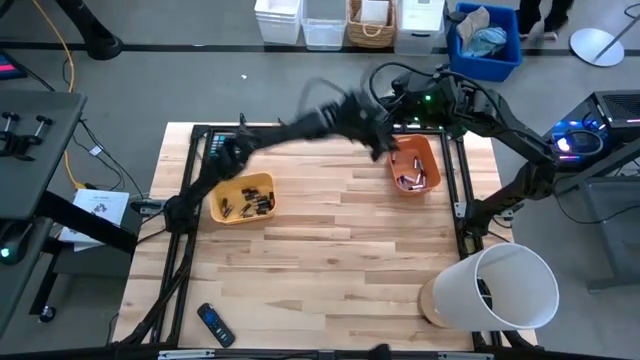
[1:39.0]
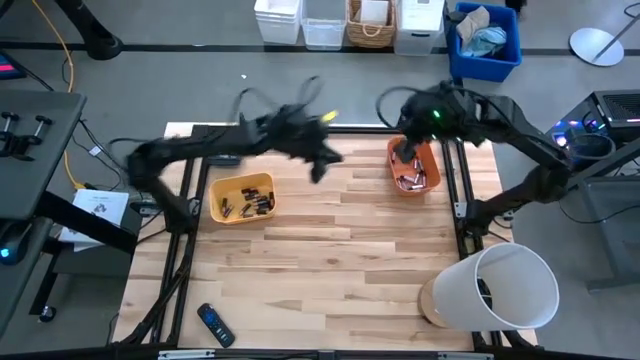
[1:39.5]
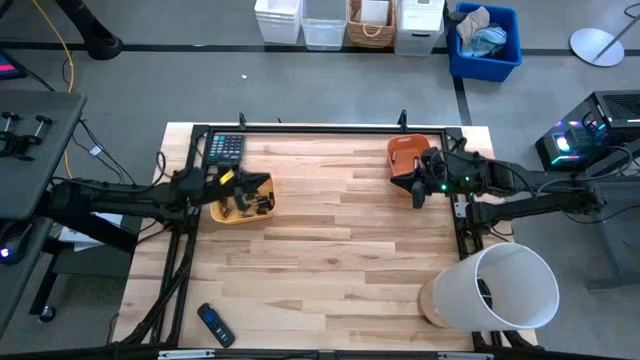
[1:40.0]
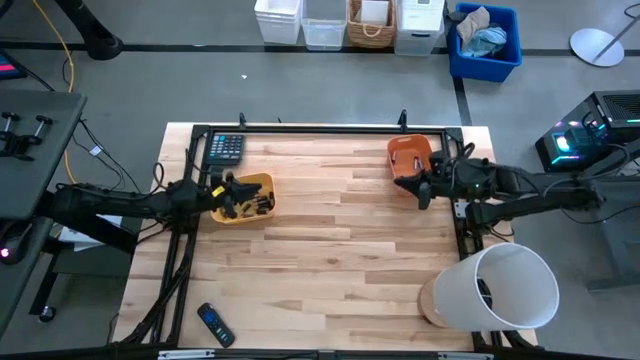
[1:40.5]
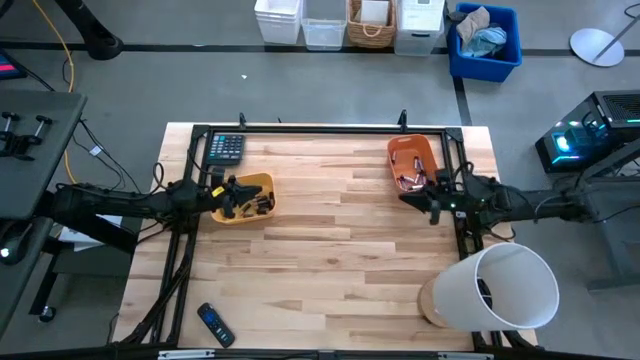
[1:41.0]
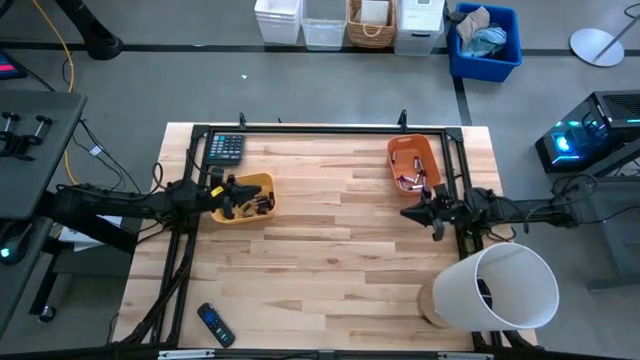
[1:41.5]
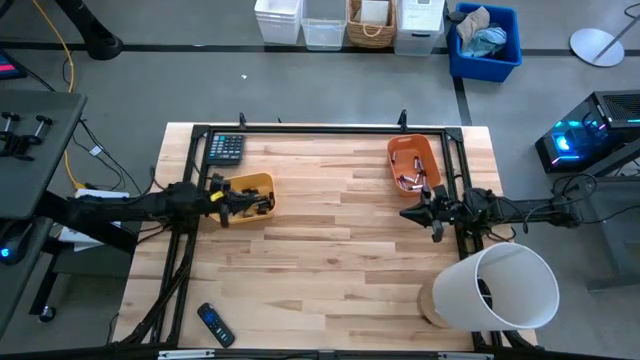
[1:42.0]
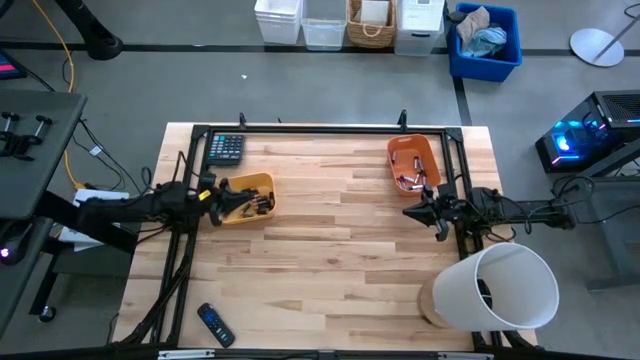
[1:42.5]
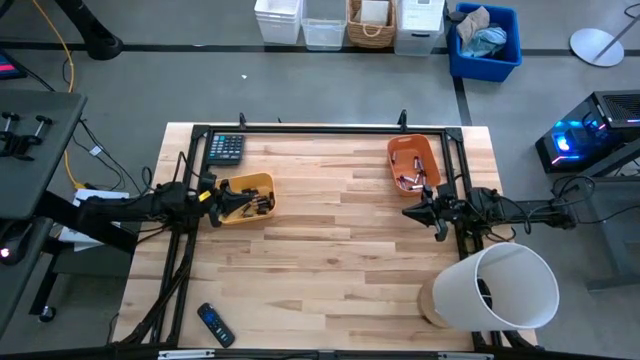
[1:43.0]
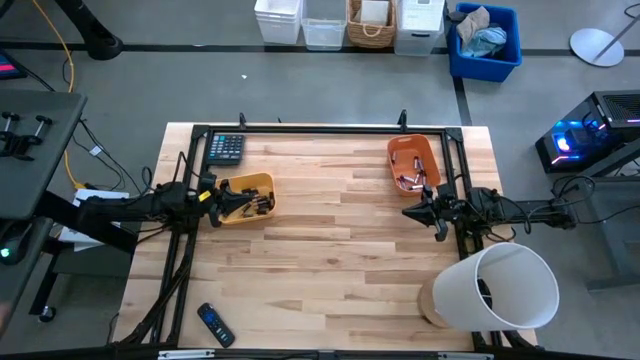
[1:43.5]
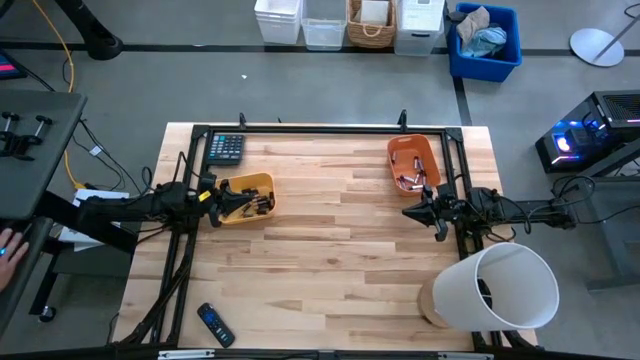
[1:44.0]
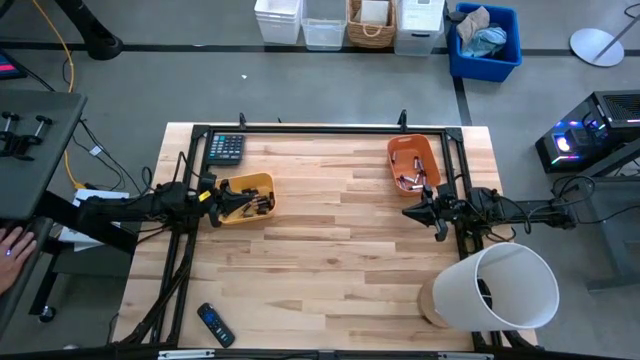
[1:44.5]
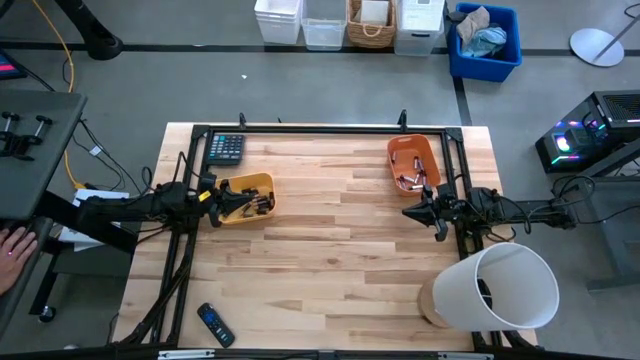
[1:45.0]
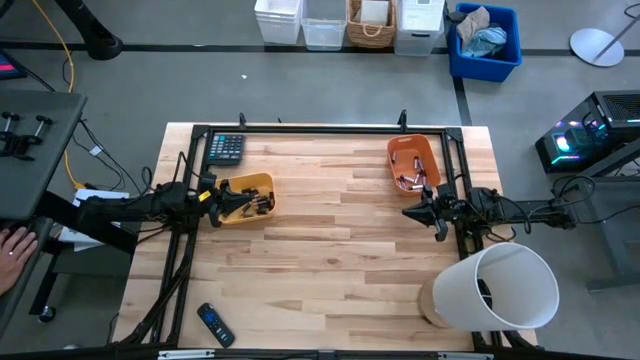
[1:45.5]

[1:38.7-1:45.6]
Task: Sort batteries
Return to Home Position

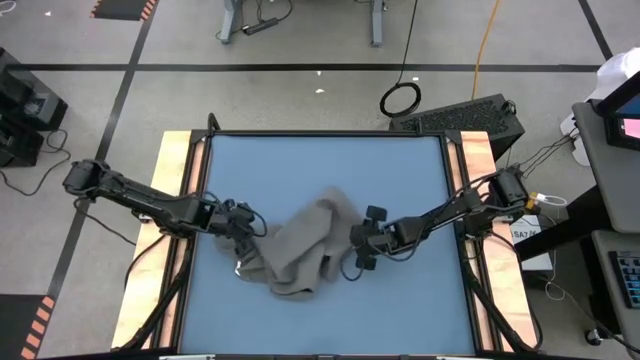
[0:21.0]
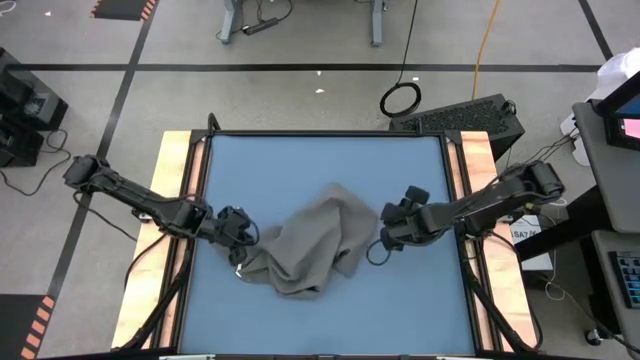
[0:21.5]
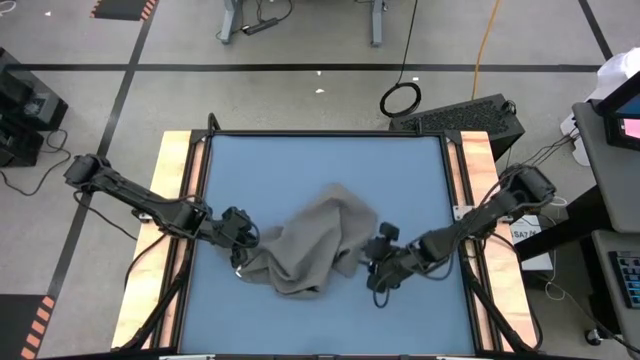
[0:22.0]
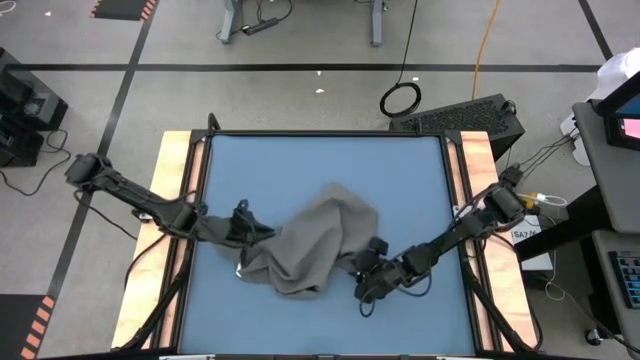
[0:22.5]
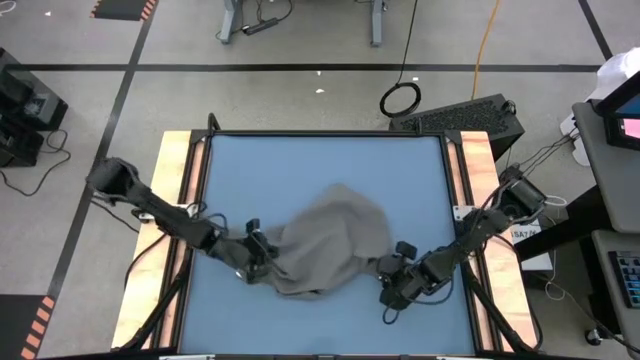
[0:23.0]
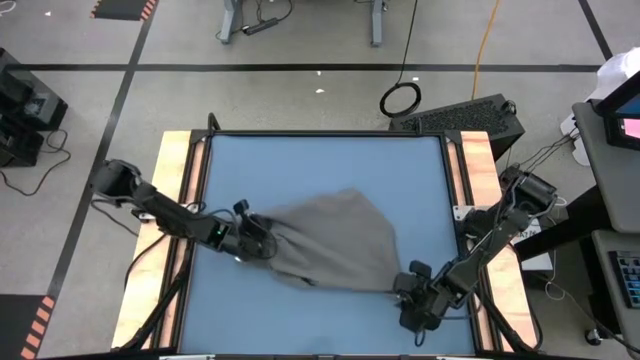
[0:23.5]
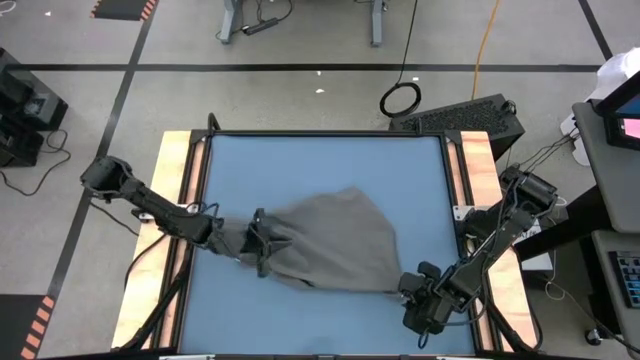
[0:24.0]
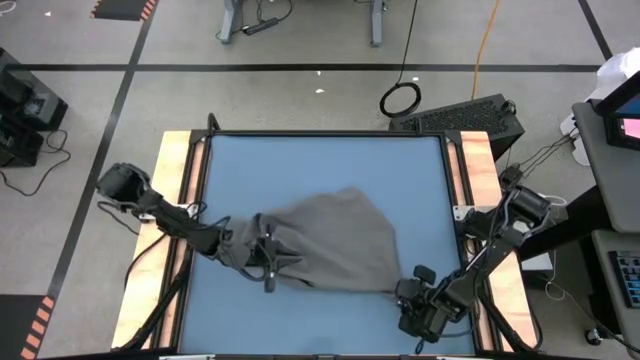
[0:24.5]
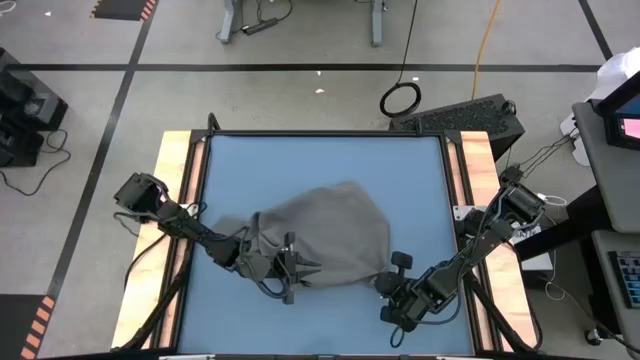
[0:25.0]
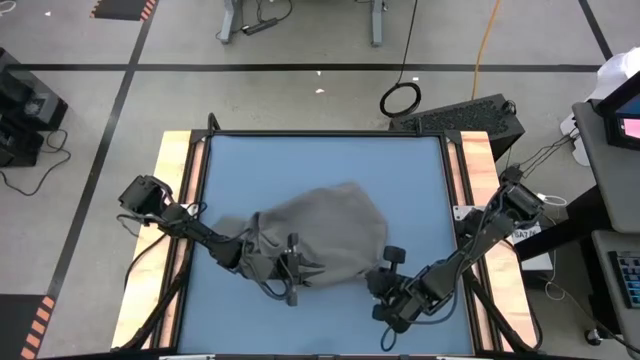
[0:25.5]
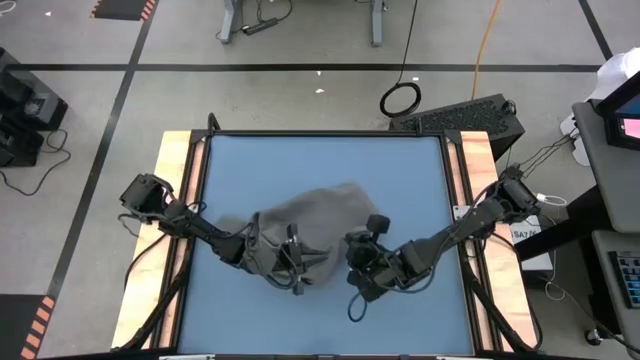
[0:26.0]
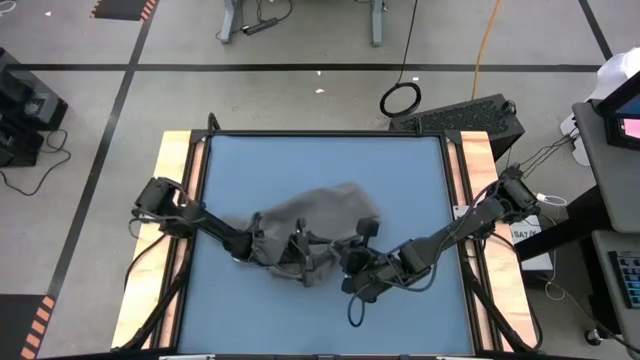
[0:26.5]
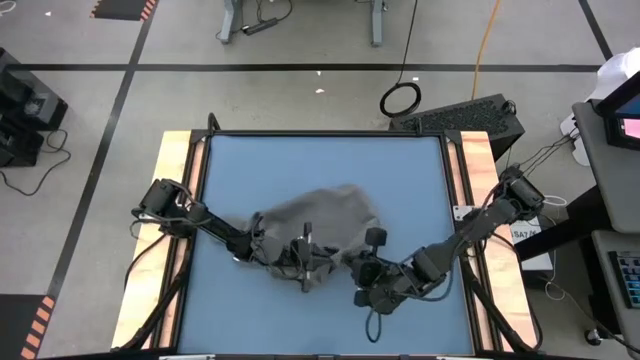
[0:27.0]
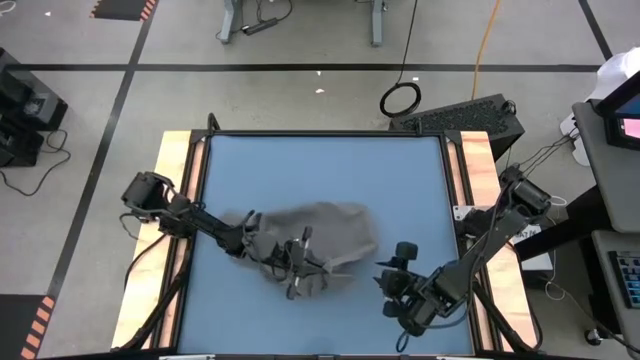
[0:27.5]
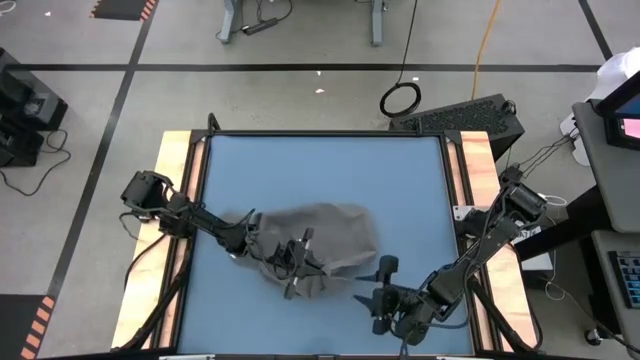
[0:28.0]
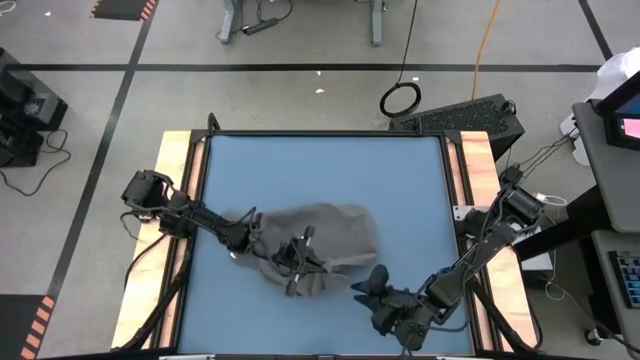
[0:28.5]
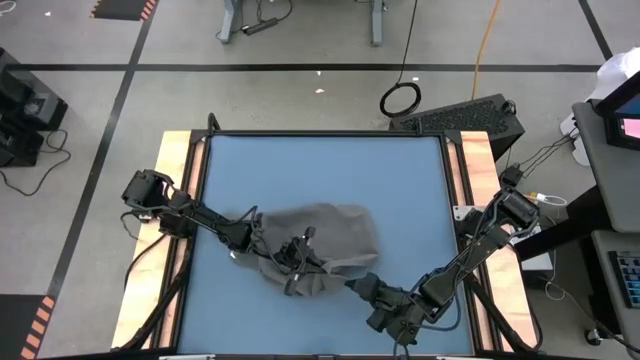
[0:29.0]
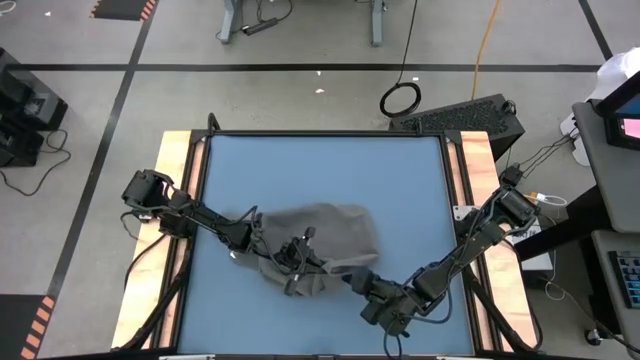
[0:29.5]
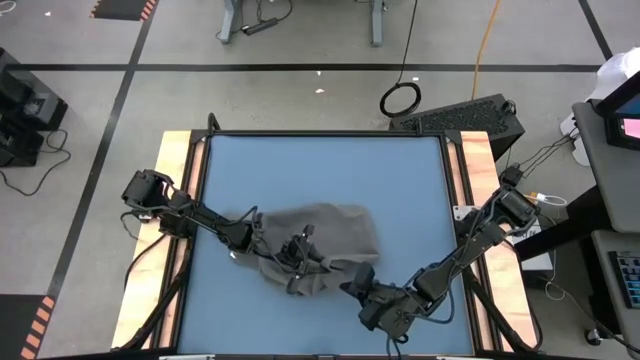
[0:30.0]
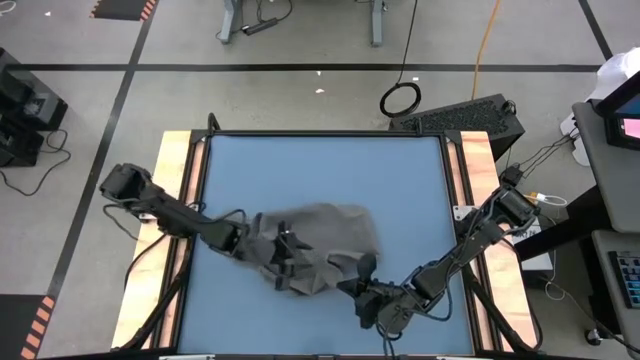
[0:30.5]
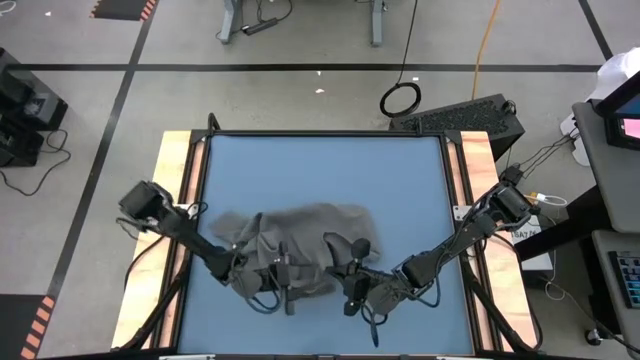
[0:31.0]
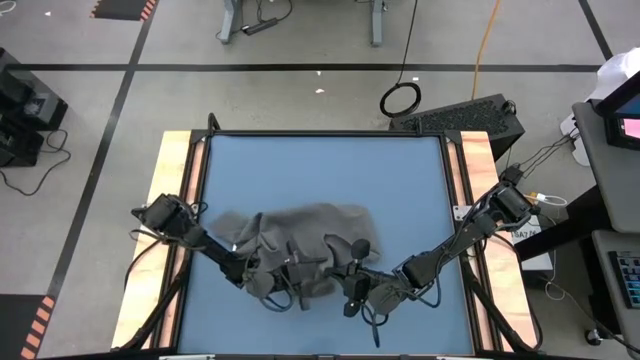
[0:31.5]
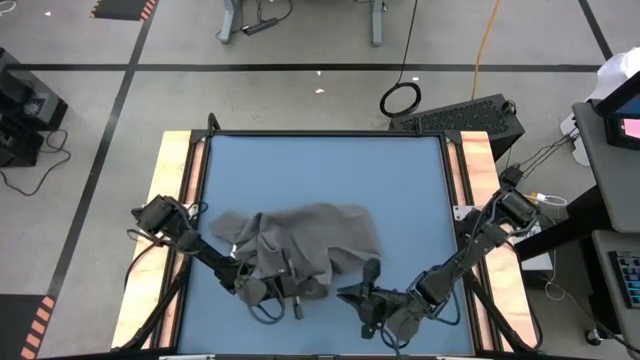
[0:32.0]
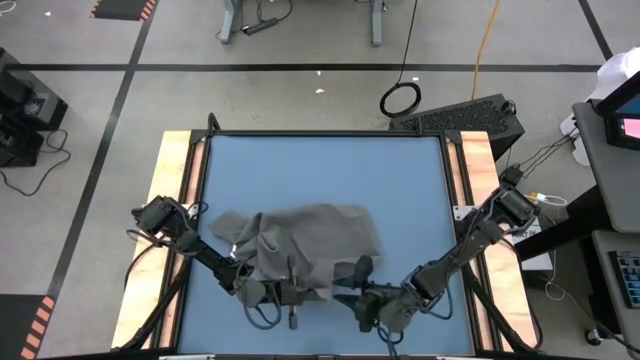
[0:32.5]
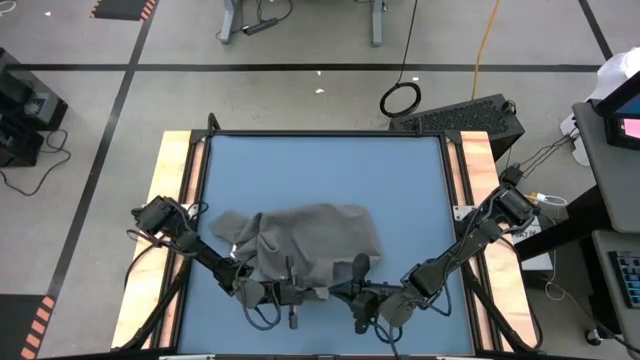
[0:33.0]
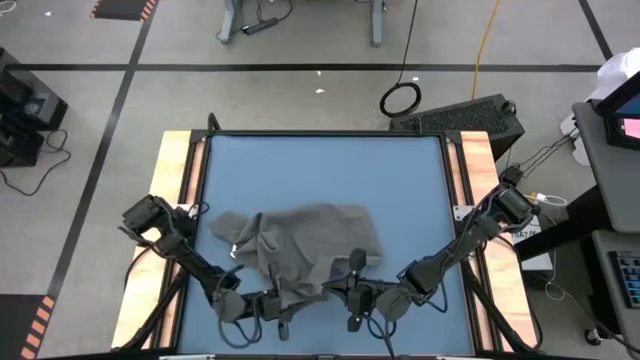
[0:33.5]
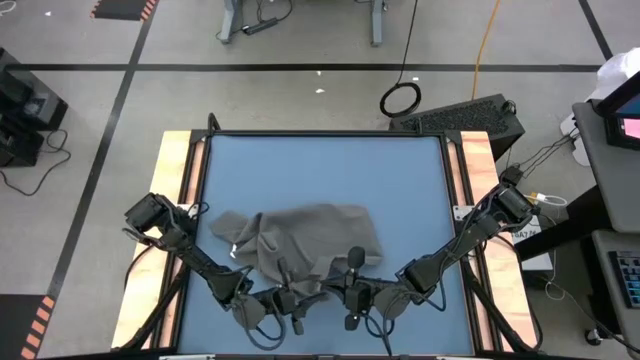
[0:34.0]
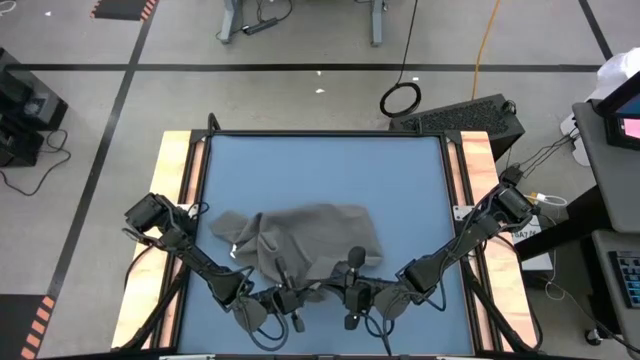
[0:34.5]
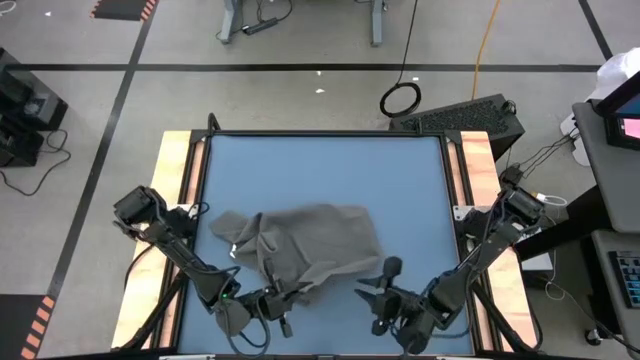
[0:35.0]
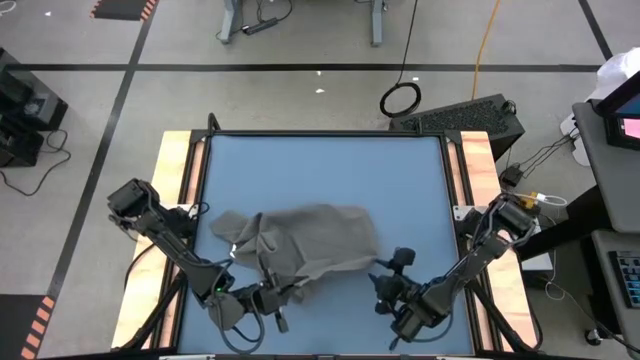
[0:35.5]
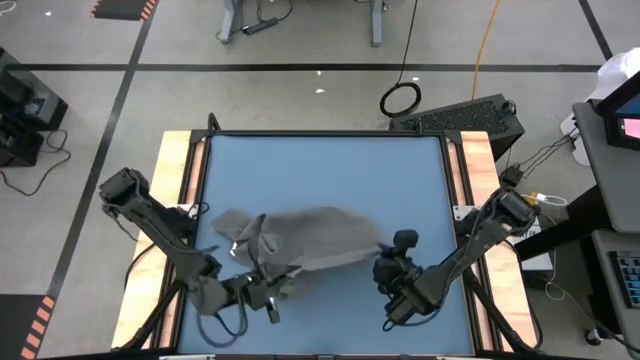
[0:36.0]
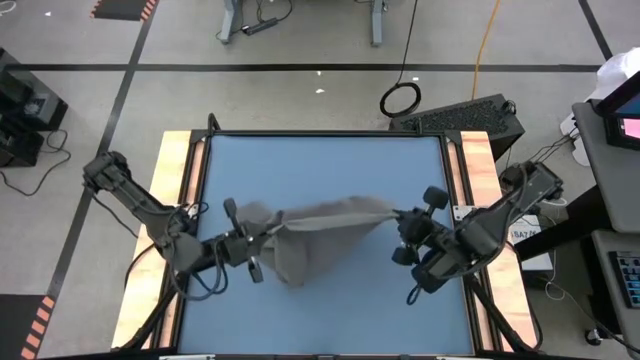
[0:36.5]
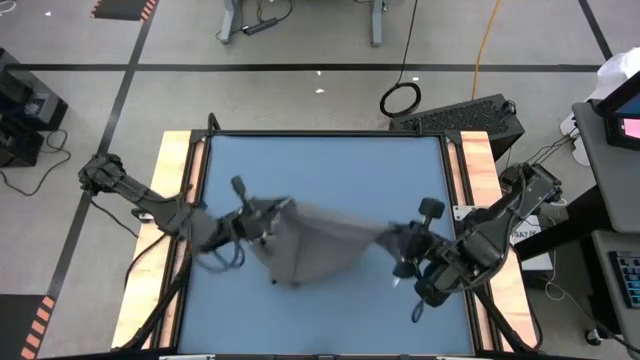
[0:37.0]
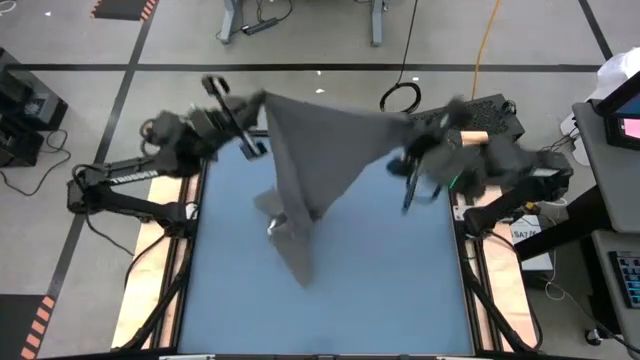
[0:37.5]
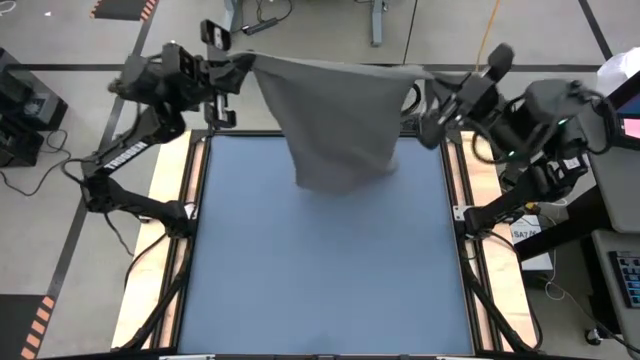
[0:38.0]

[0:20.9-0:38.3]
Task: Roll towel
Roll the gray towel
